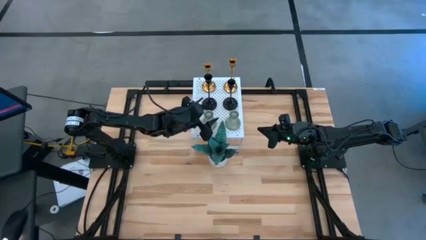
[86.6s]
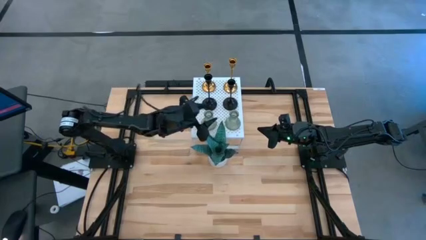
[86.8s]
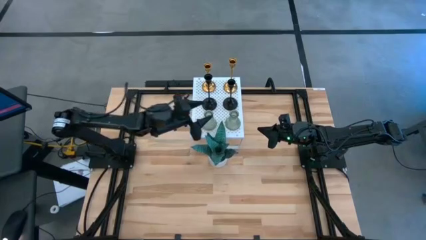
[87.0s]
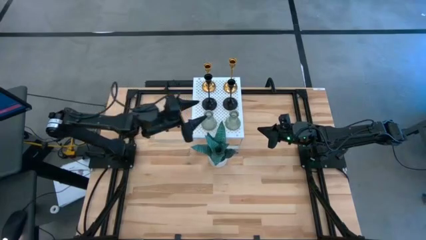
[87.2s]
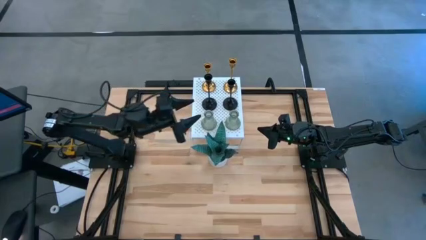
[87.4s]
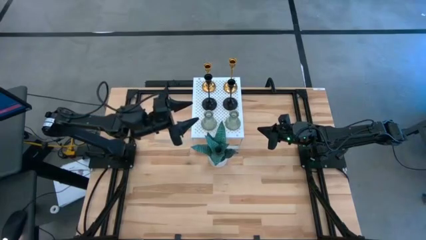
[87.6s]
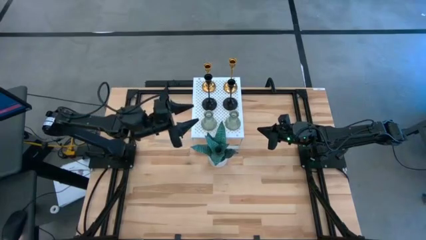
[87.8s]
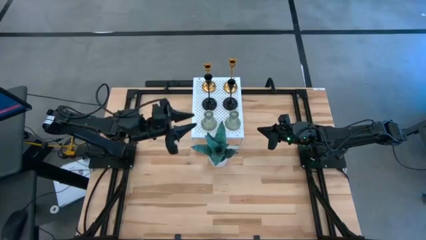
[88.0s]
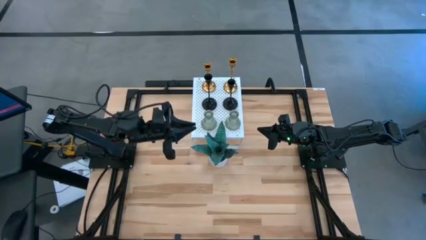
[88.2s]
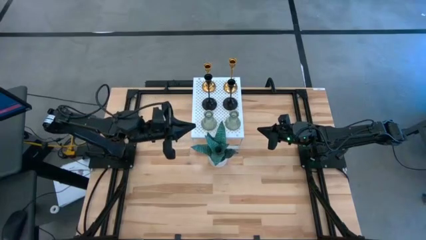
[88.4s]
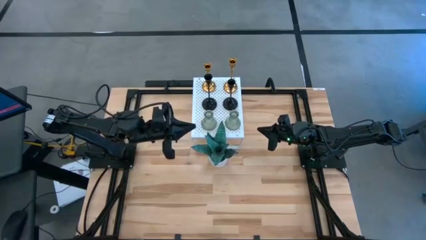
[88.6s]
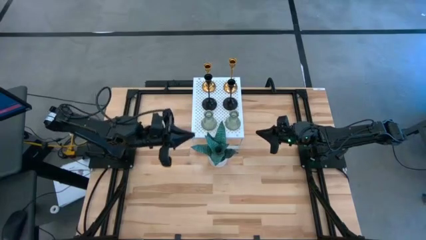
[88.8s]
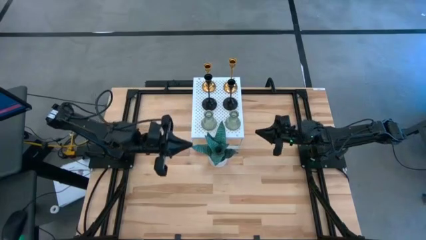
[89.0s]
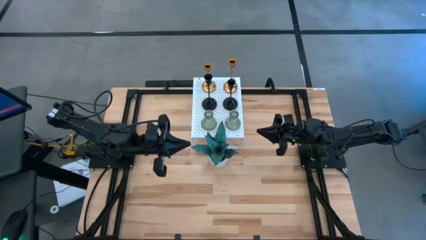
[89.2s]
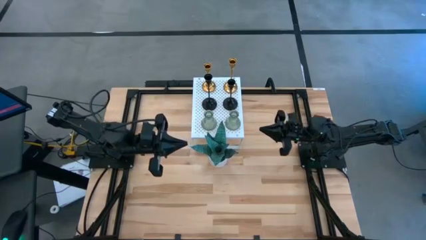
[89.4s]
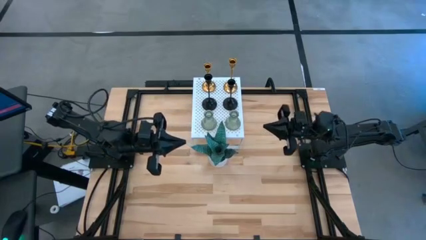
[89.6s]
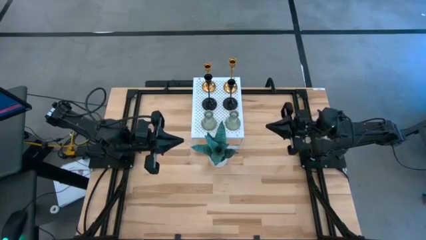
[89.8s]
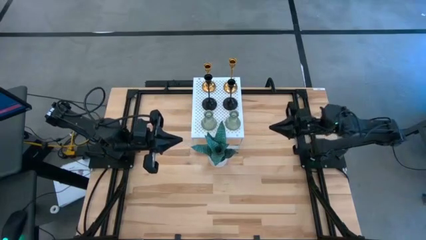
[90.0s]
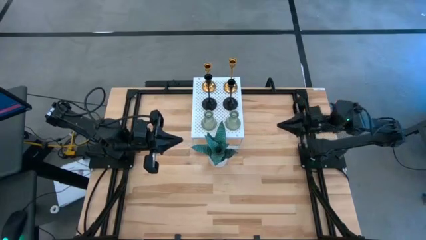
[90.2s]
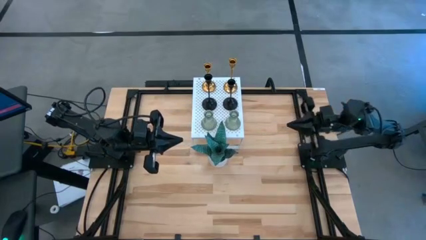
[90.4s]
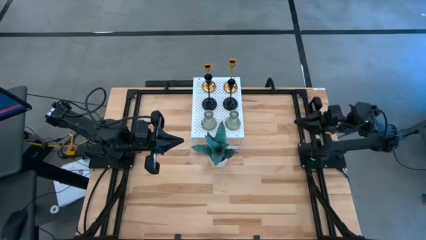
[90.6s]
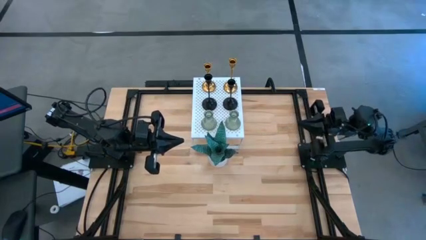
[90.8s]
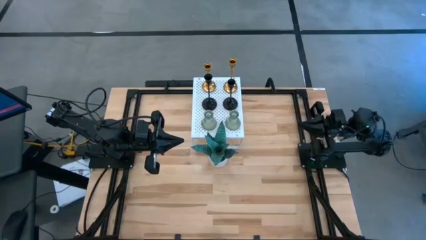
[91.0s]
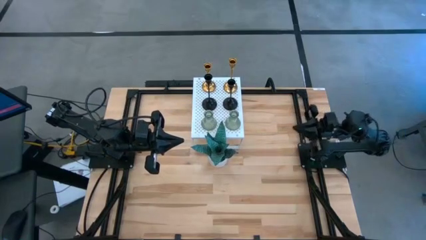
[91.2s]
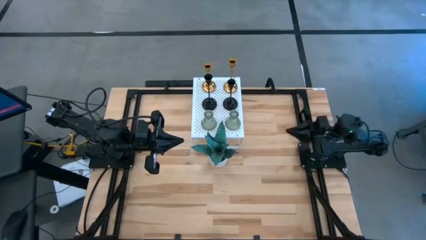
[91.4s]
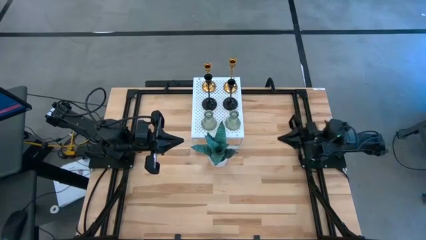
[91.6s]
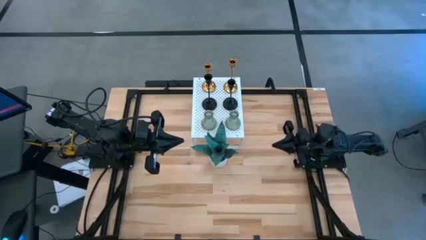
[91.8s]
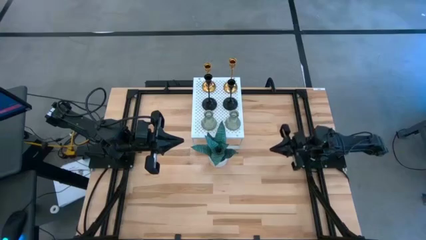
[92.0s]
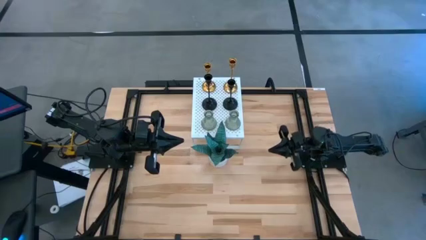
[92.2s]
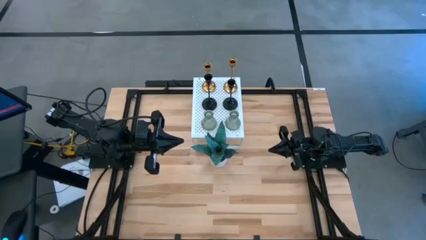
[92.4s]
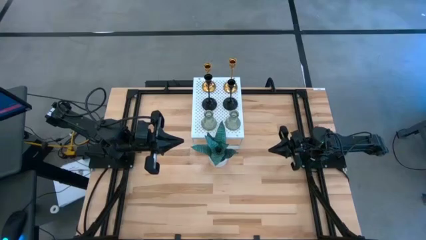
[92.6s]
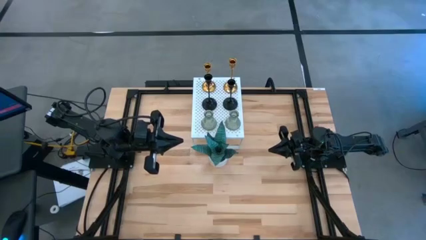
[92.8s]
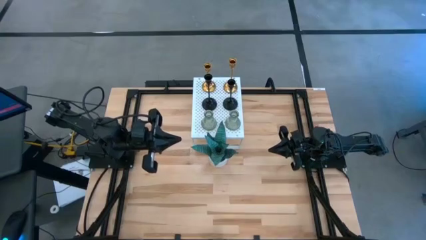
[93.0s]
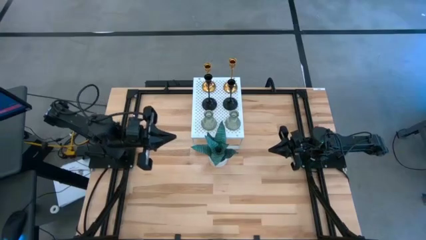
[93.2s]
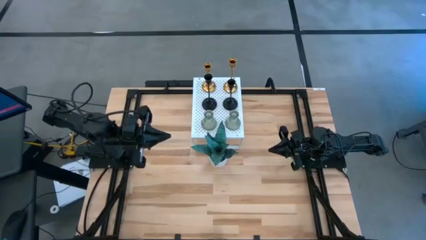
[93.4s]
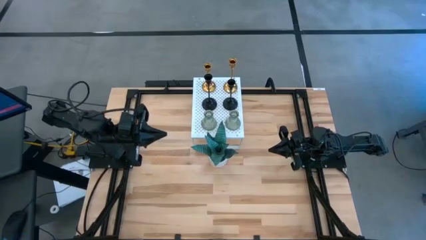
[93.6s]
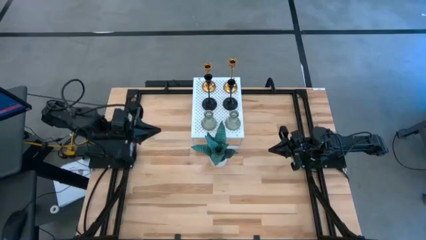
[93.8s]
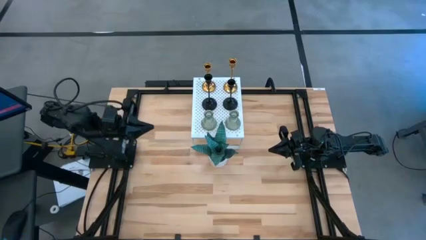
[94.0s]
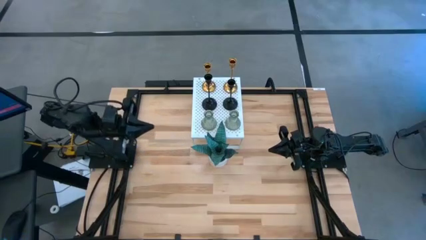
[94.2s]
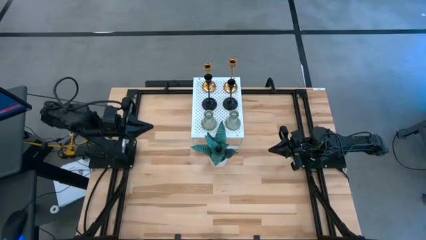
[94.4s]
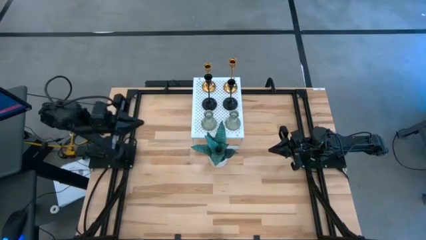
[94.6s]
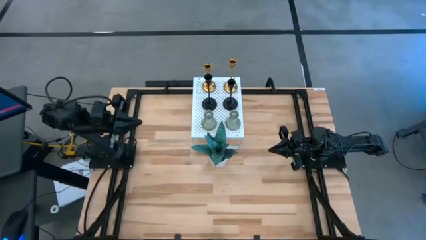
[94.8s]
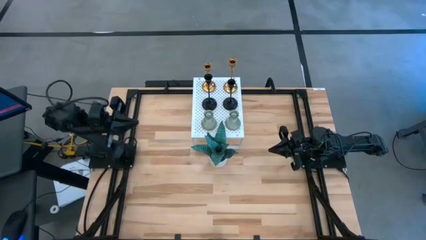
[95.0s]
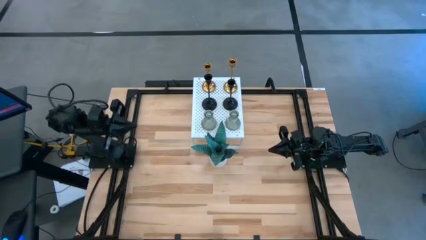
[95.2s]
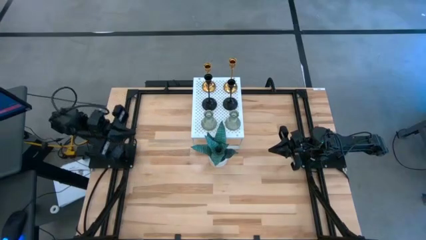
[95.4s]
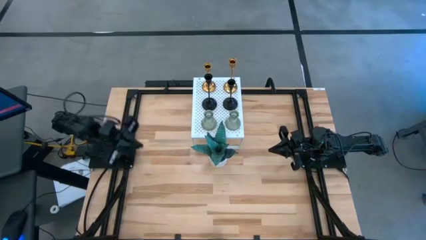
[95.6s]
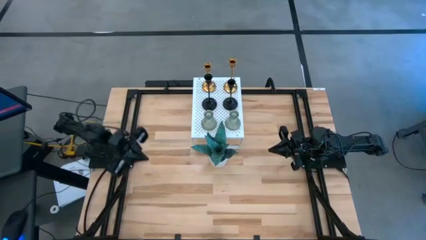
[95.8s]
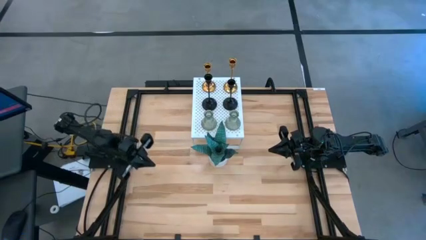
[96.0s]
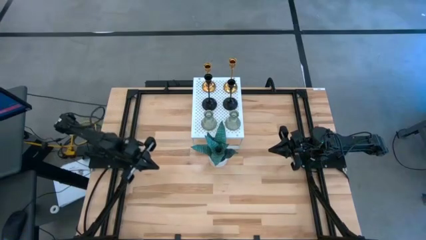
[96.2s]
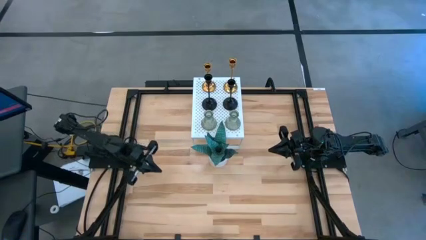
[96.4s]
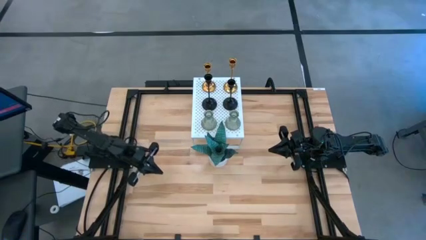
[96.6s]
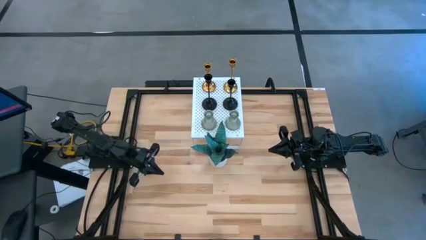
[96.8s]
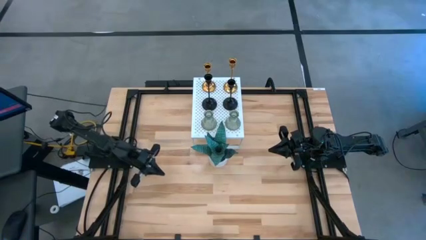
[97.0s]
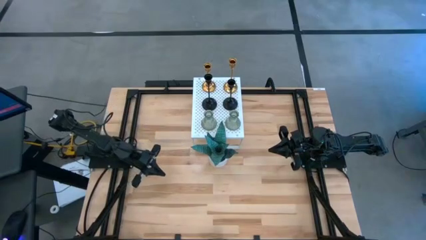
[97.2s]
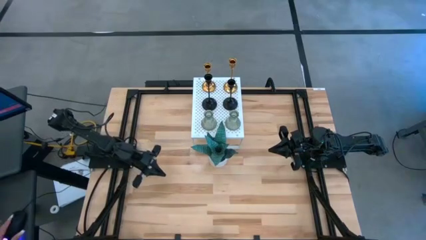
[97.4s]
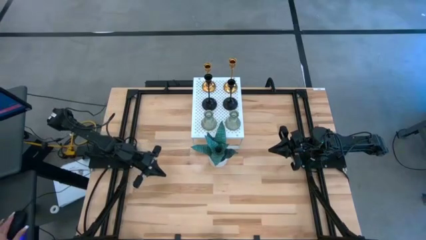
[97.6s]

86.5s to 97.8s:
Task: Pick & Place candle stick holders
Return to Home Position
